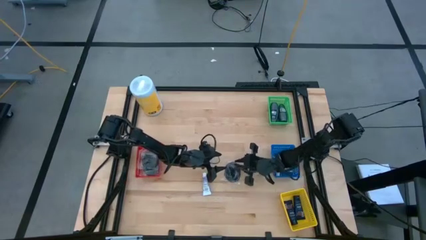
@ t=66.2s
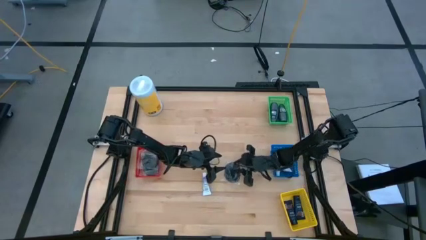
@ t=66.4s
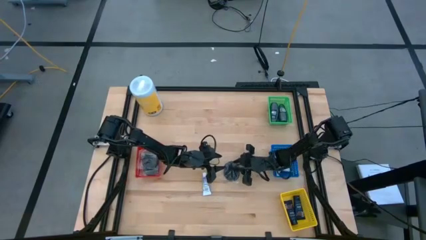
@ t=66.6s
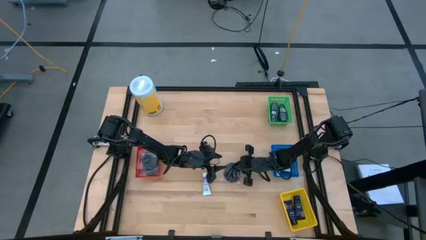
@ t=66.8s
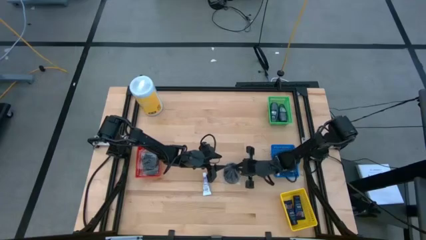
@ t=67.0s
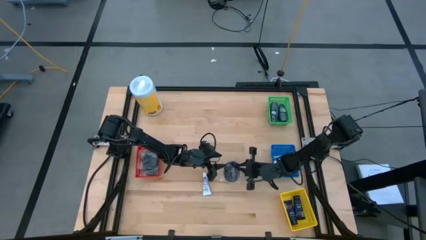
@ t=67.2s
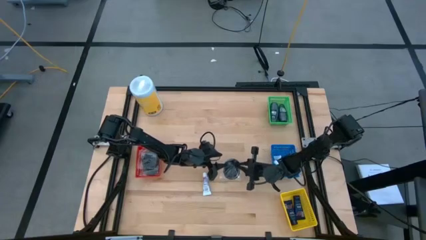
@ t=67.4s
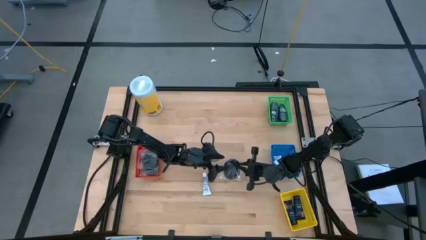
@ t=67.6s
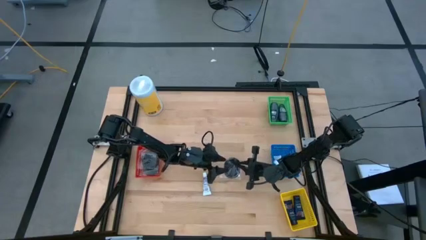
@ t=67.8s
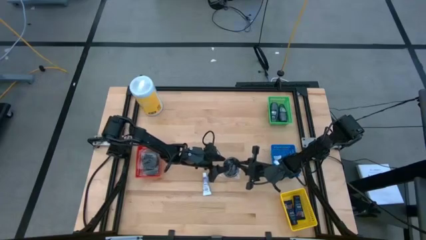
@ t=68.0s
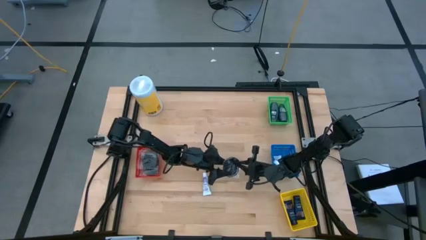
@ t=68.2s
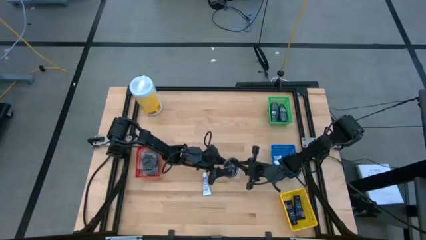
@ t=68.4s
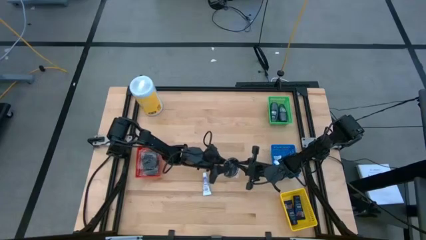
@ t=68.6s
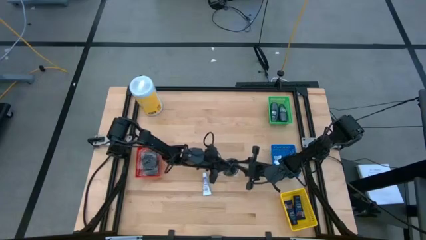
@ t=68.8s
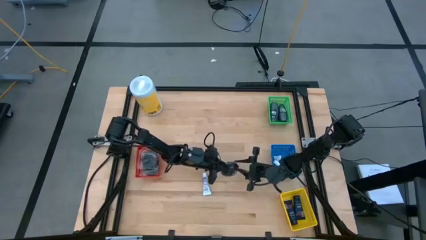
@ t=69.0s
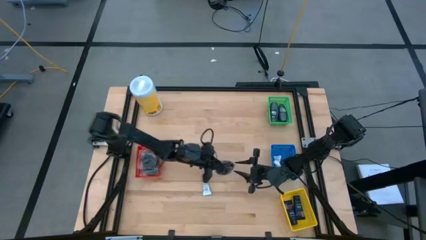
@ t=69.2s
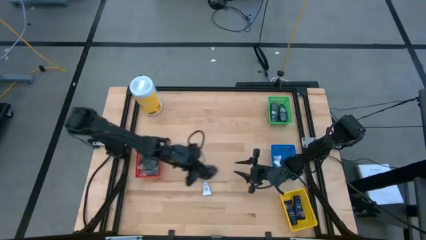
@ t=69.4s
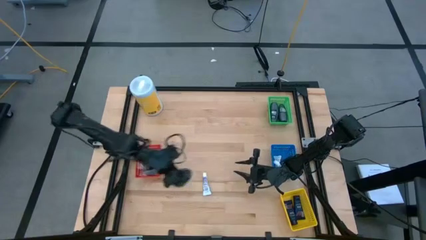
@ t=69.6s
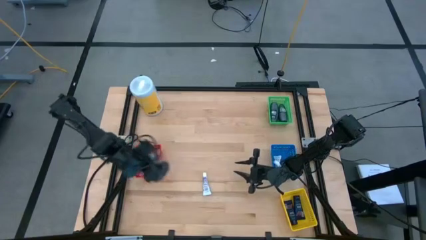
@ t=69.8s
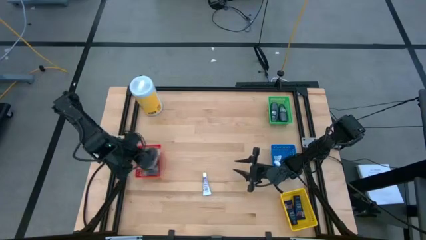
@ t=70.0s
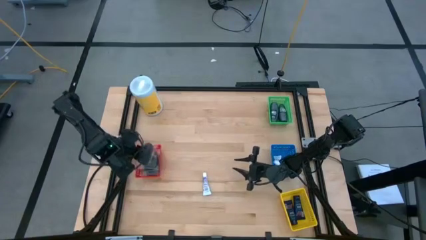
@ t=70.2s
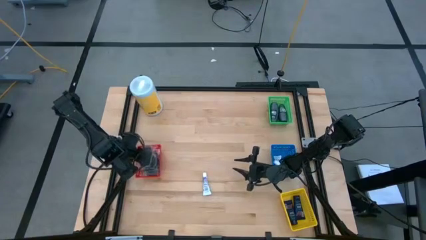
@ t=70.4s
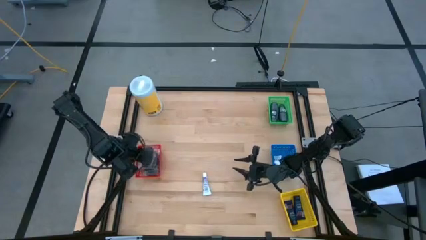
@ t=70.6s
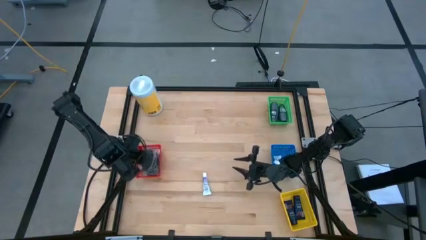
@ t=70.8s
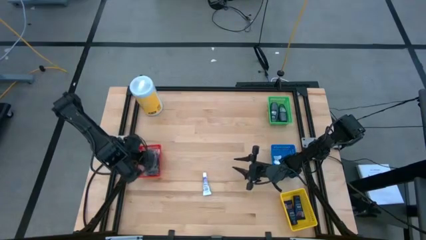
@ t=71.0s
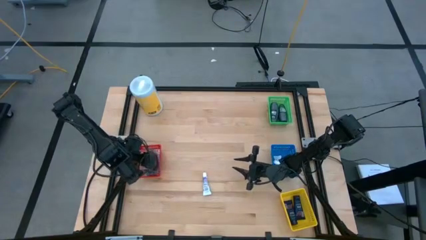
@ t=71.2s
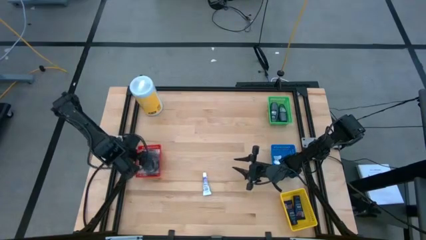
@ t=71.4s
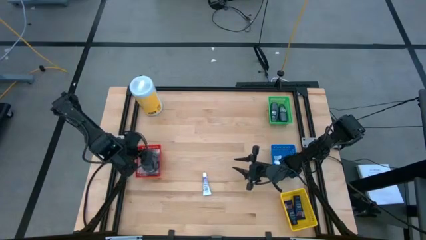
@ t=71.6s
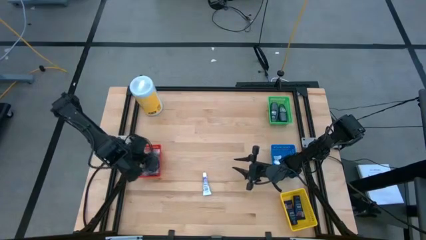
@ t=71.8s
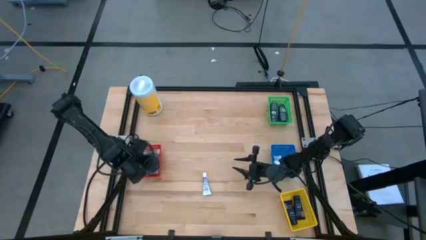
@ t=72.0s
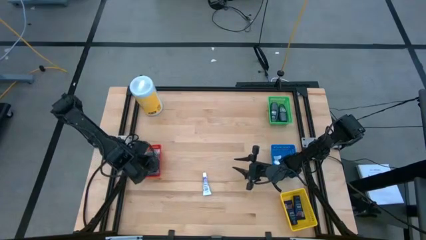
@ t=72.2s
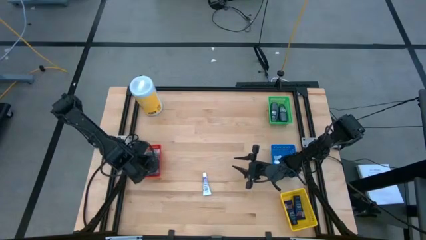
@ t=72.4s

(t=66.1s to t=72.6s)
Task: Pick & Place Travel size toiletries
Put the hair comb into the red bin

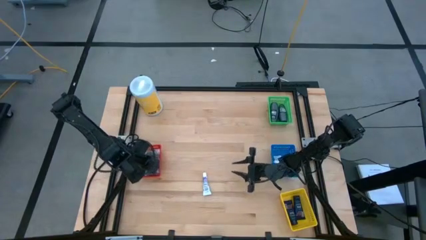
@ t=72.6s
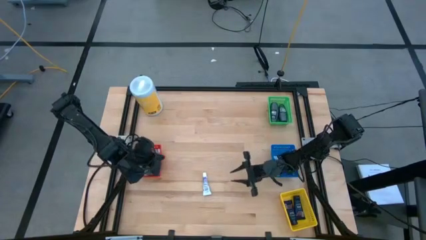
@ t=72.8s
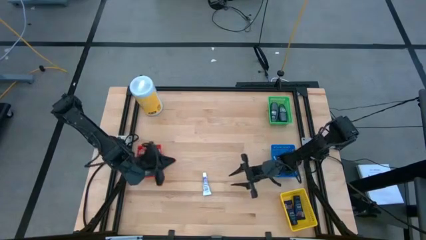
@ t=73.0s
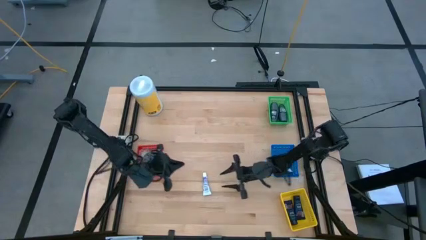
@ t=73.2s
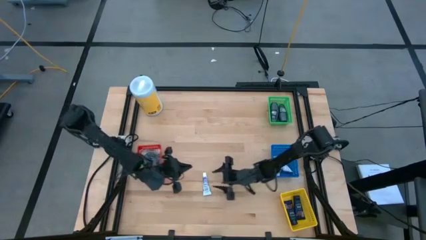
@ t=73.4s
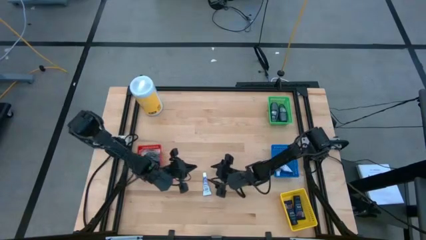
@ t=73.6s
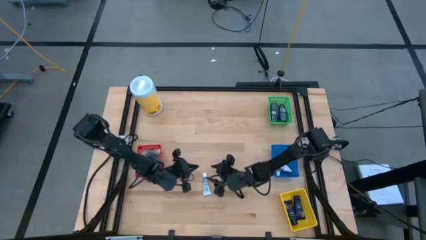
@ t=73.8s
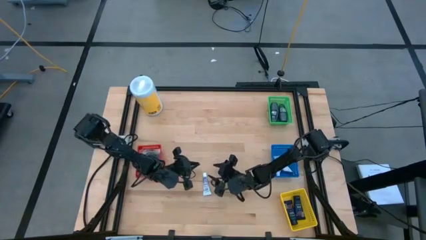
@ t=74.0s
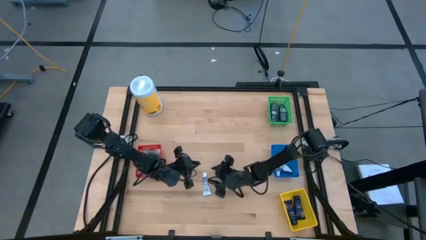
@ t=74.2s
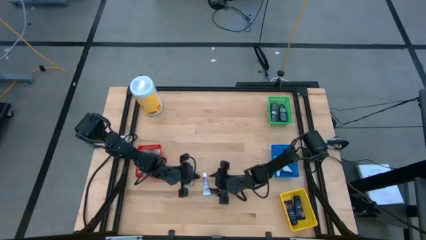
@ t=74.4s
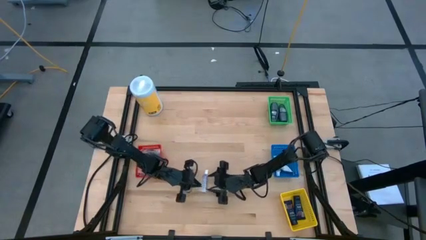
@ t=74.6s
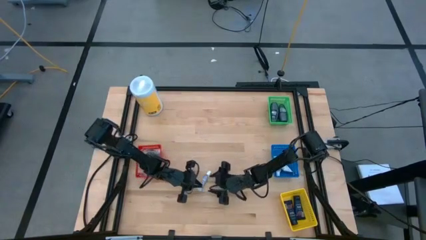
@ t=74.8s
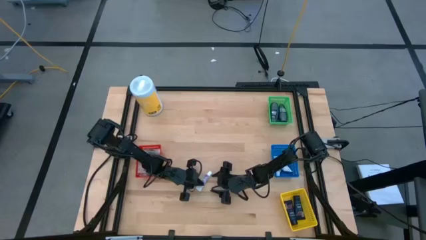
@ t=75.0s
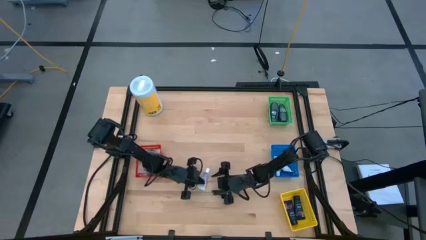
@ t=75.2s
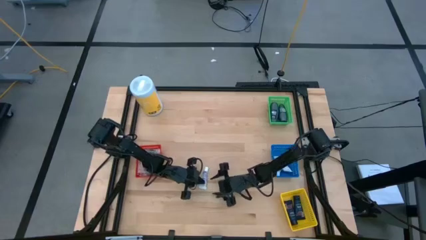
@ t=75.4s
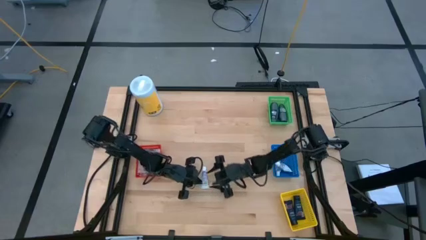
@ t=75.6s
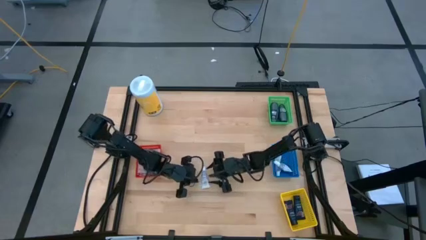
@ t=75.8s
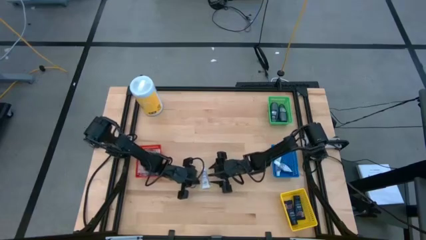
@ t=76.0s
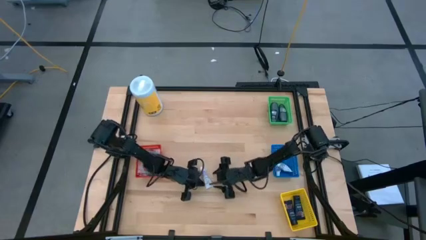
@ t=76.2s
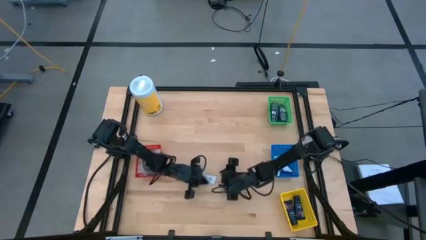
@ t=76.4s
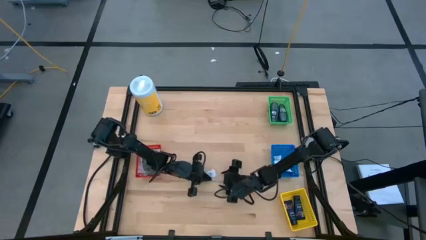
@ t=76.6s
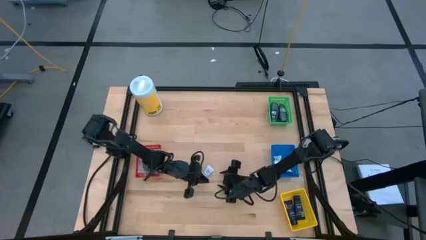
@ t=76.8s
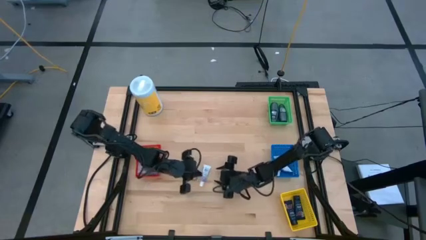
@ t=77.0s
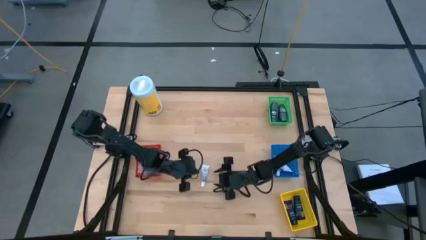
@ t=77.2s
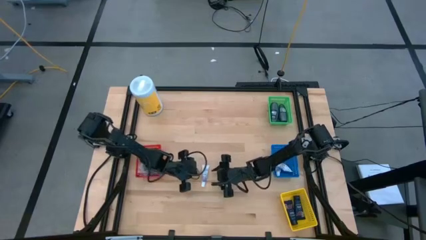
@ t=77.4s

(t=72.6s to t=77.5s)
Put the toothpaste into the blue bin

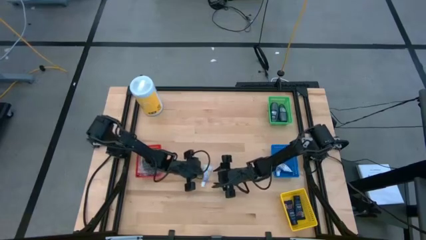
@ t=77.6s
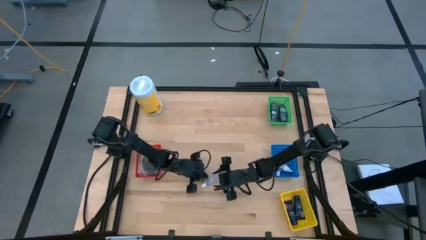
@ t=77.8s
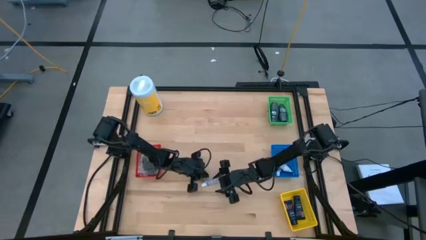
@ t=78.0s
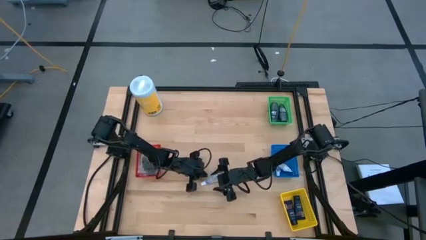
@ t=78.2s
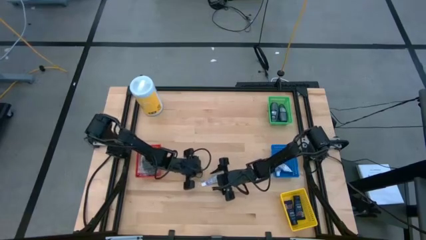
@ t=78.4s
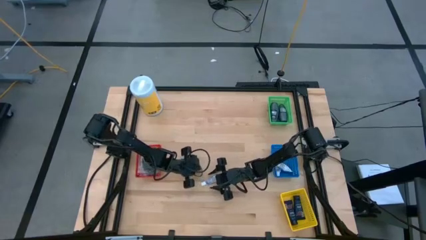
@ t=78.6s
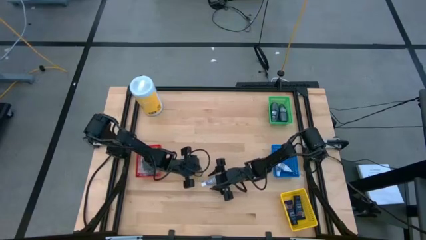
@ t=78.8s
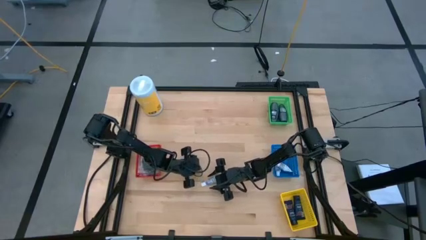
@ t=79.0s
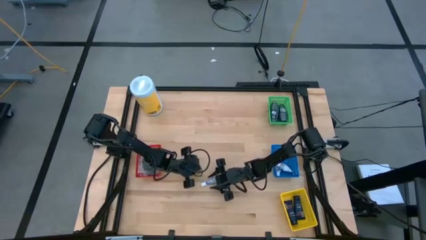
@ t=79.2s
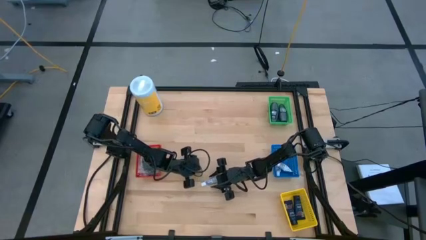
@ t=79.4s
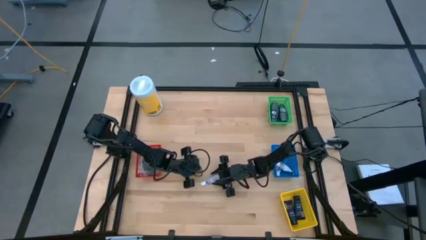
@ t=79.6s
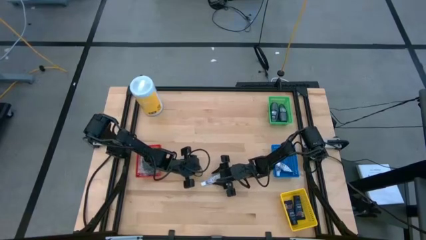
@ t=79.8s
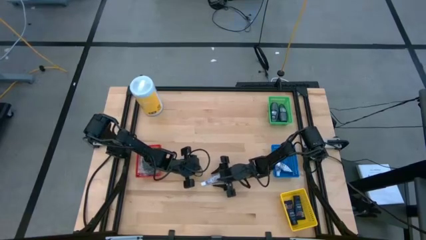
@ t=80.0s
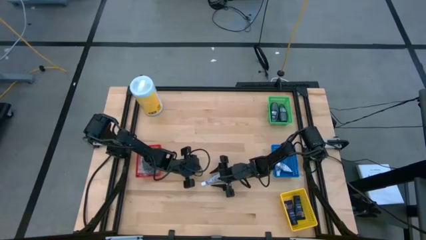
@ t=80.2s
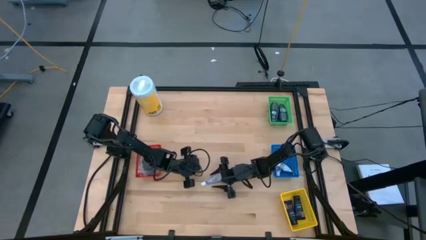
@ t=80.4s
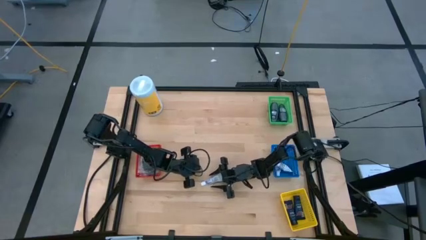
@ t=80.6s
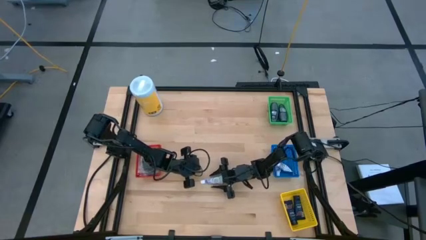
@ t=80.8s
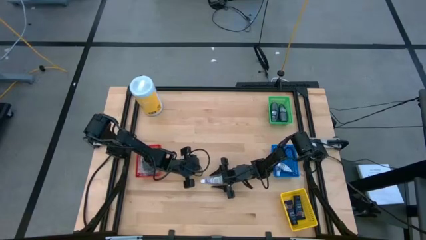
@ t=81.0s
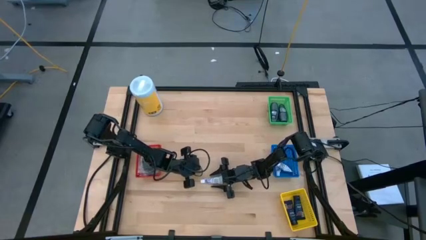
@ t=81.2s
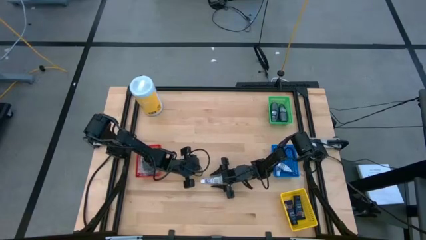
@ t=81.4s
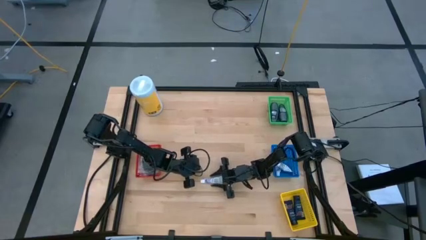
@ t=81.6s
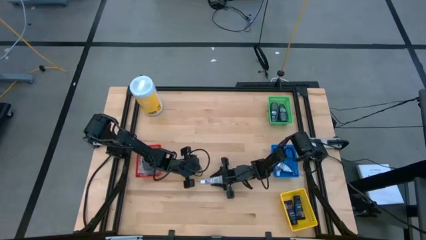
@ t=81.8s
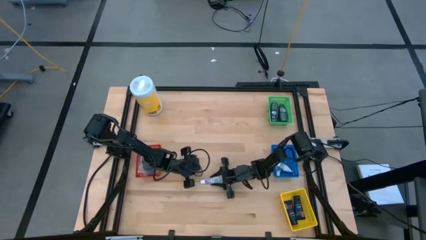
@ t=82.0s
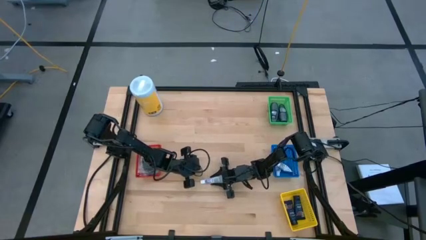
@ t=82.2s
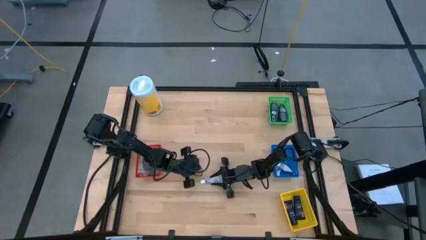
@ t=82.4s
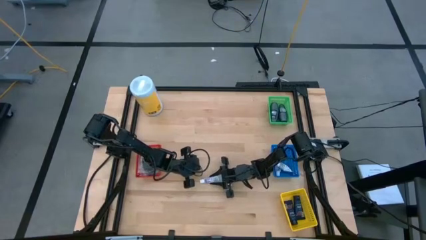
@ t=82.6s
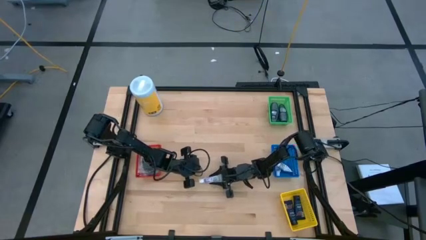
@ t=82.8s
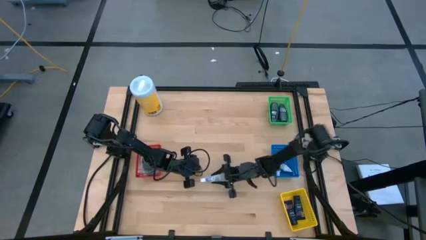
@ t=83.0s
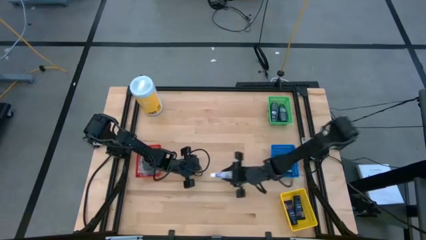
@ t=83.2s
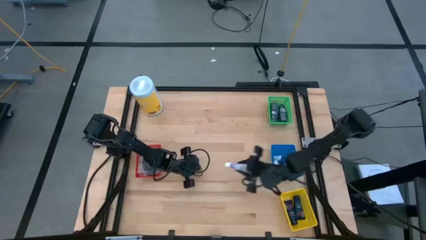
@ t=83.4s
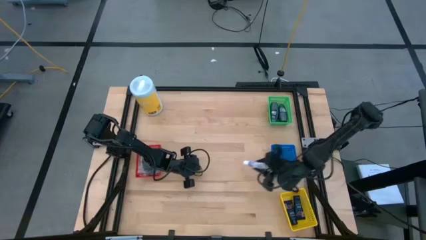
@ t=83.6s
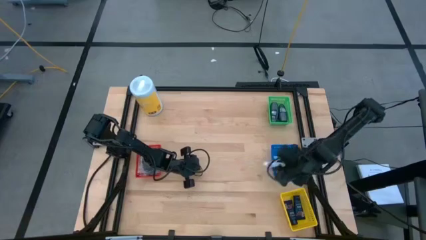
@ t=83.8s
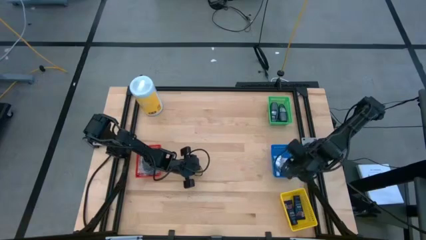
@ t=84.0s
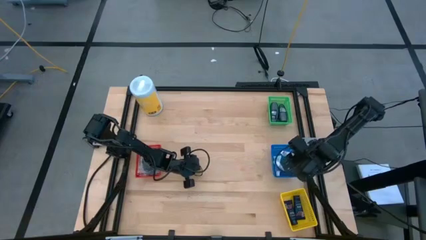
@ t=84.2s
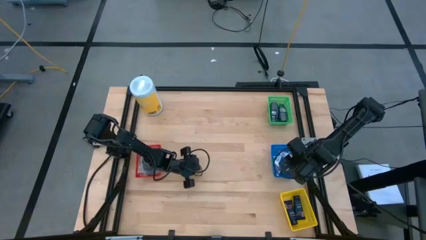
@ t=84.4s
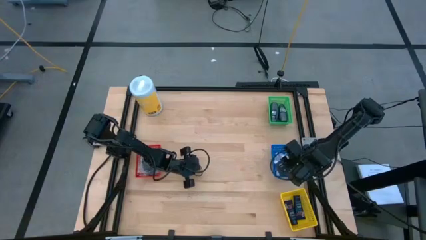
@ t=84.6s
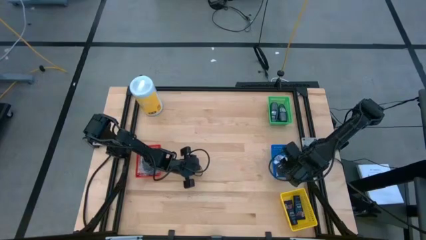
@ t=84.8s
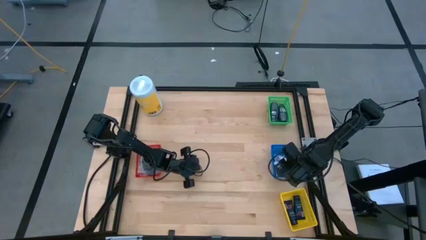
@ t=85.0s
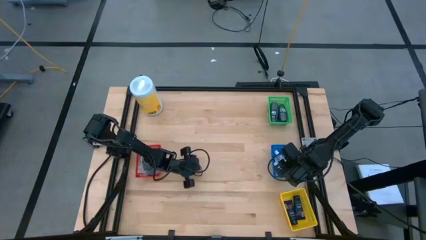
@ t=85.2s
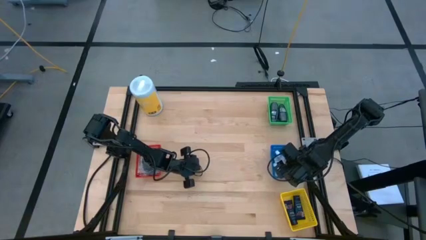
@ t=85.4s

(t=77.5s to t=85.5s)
Put the toothpaste into the blue bin
